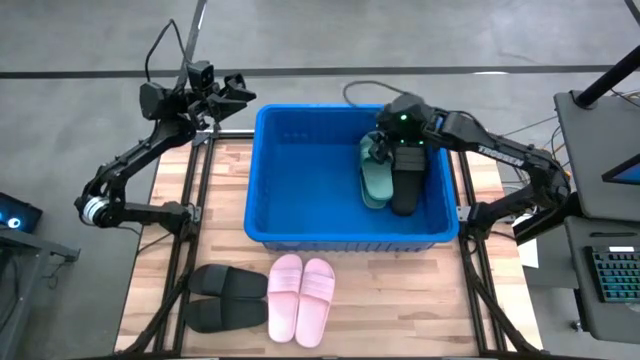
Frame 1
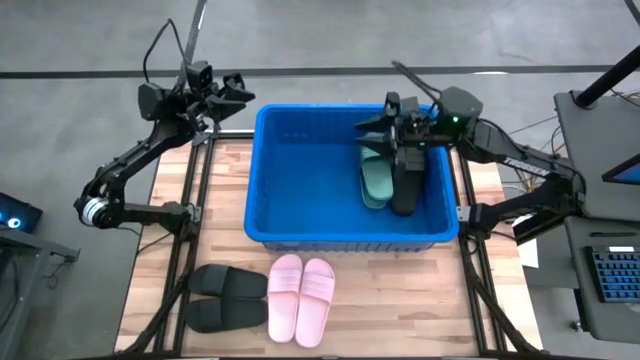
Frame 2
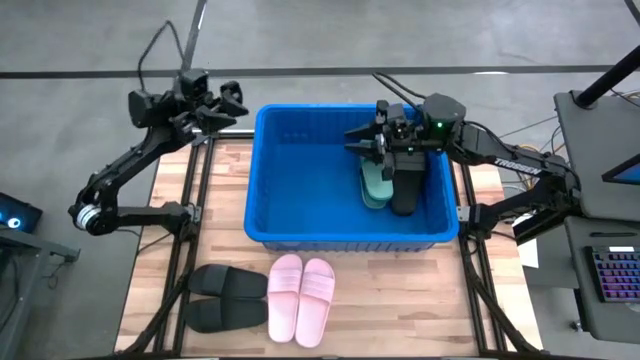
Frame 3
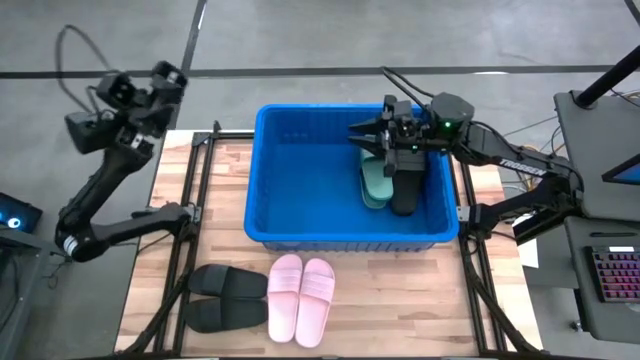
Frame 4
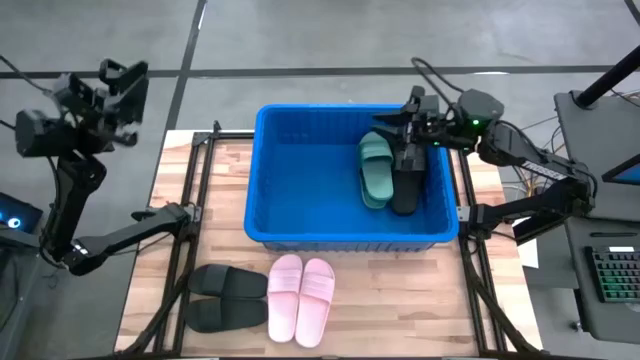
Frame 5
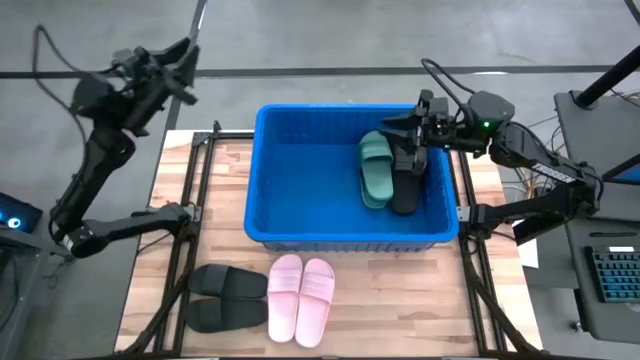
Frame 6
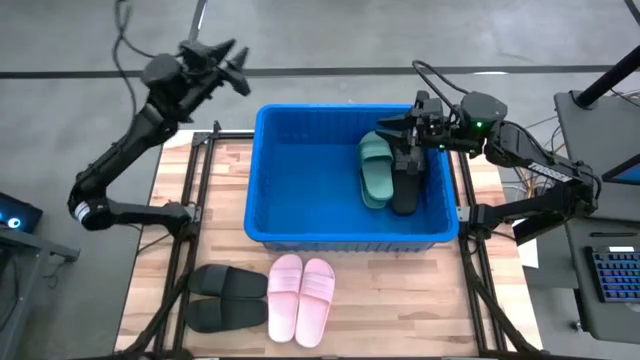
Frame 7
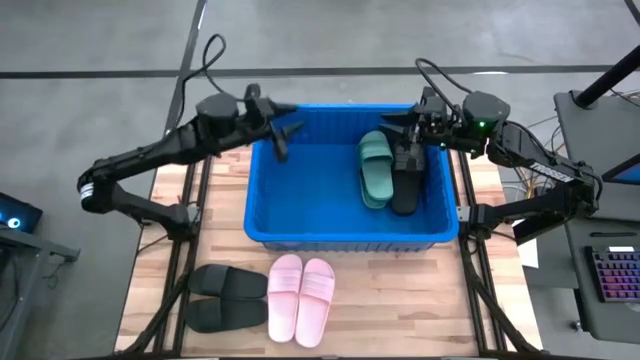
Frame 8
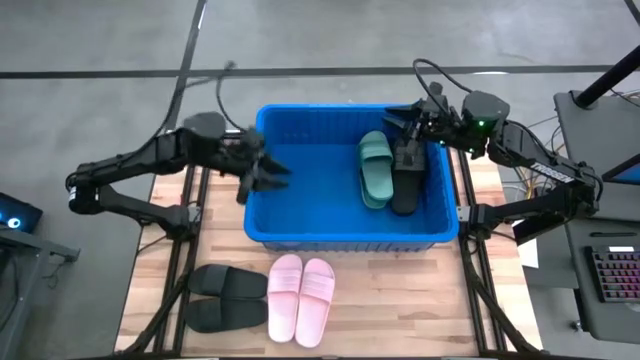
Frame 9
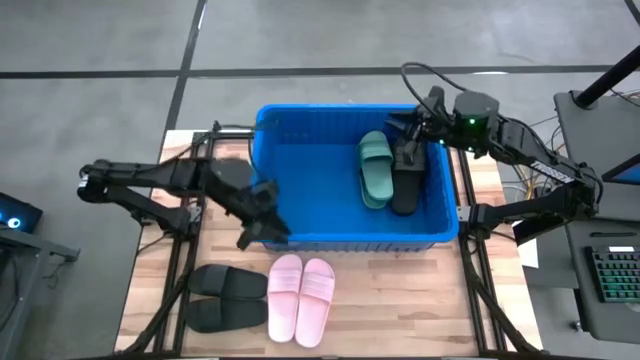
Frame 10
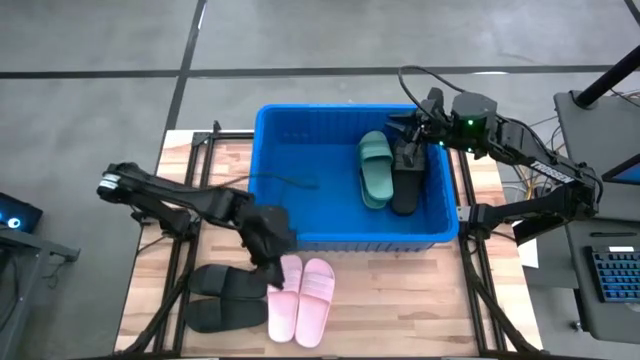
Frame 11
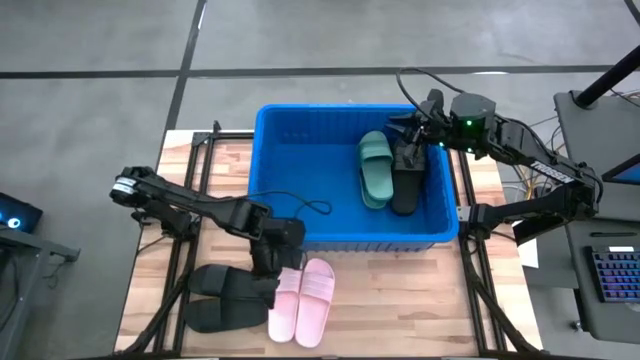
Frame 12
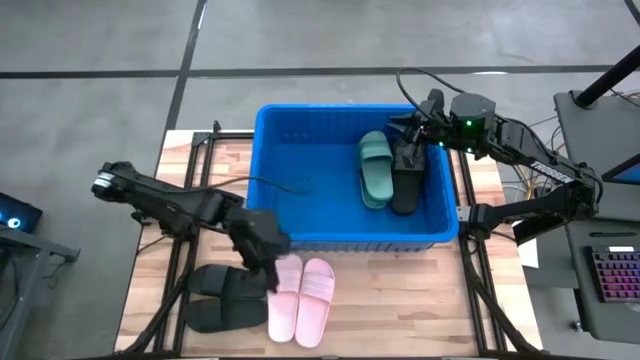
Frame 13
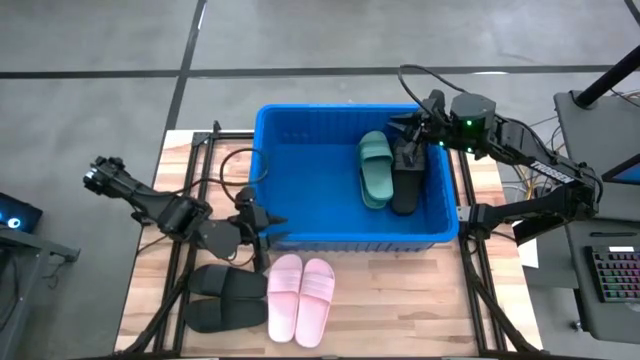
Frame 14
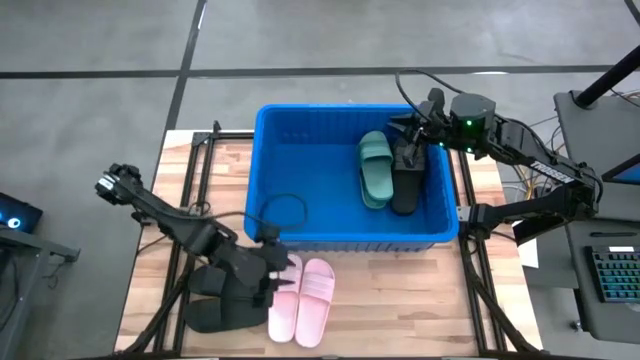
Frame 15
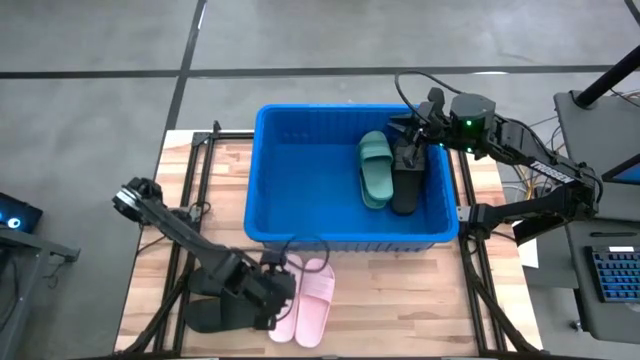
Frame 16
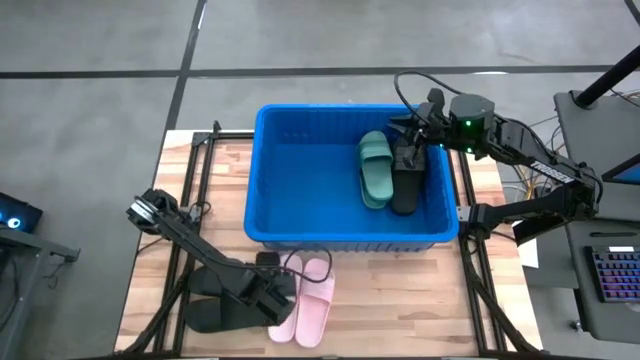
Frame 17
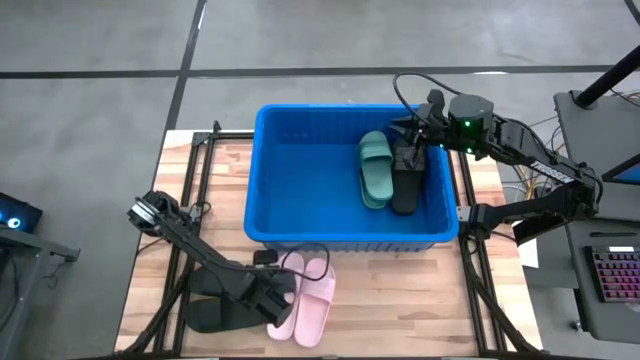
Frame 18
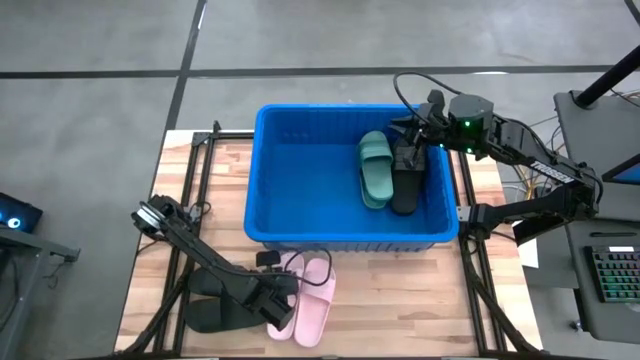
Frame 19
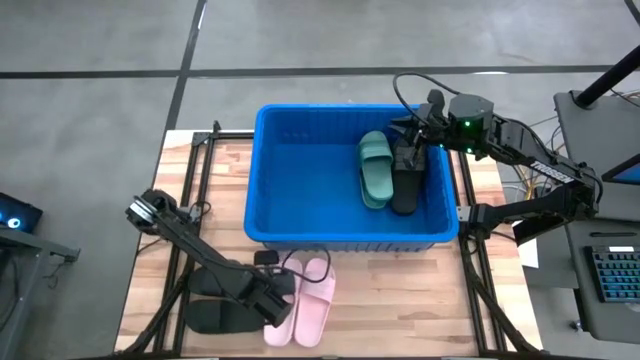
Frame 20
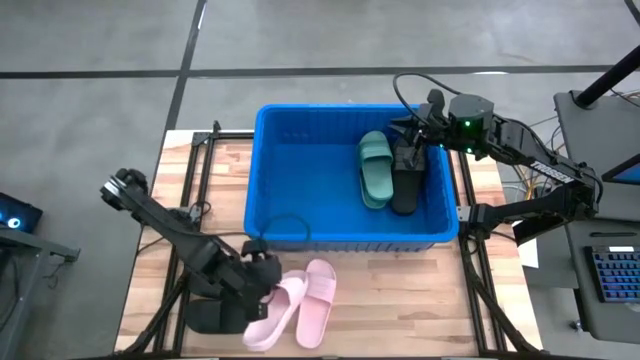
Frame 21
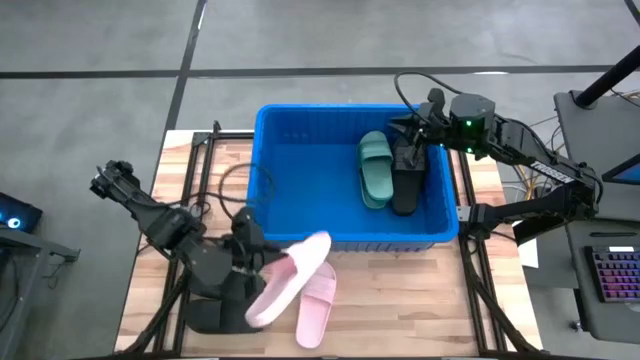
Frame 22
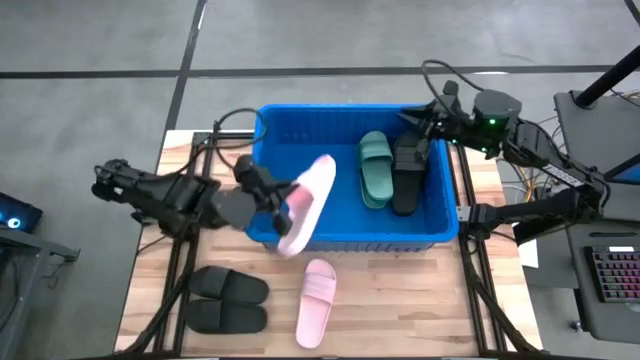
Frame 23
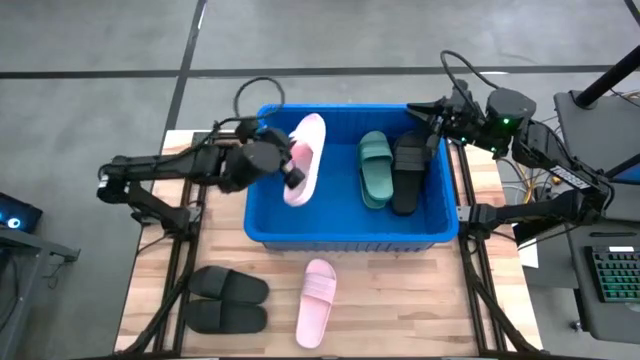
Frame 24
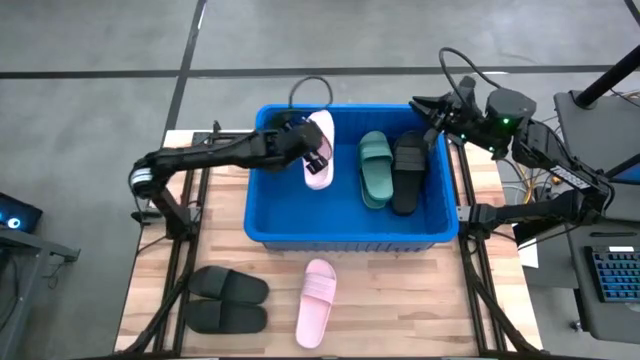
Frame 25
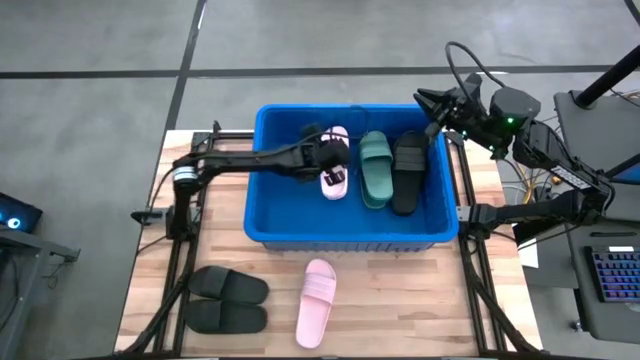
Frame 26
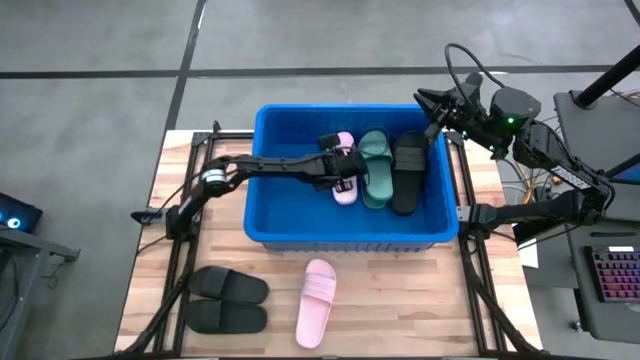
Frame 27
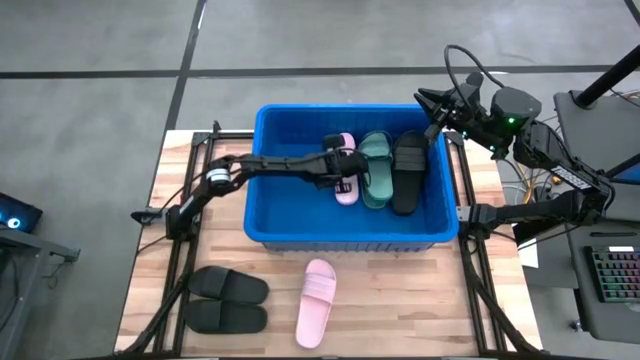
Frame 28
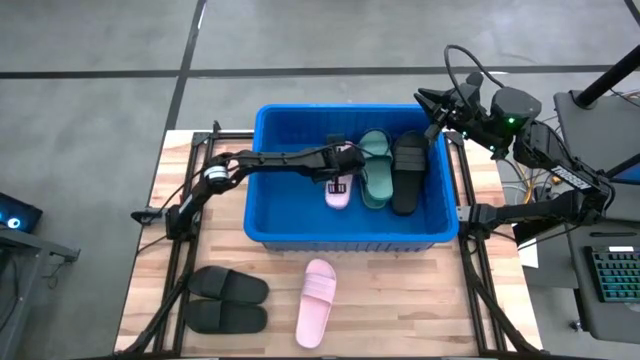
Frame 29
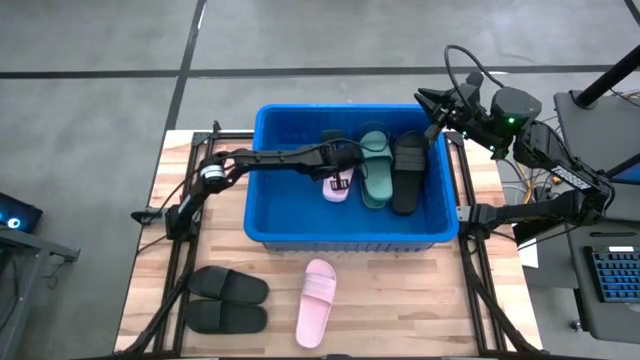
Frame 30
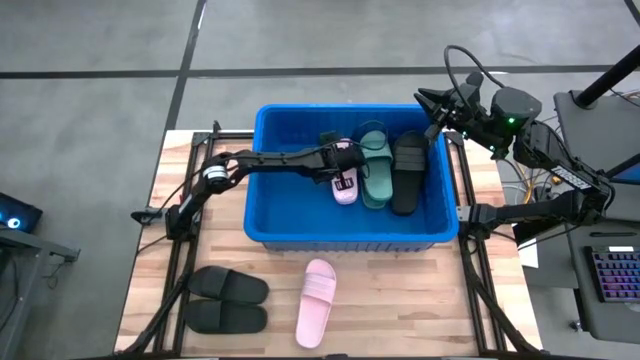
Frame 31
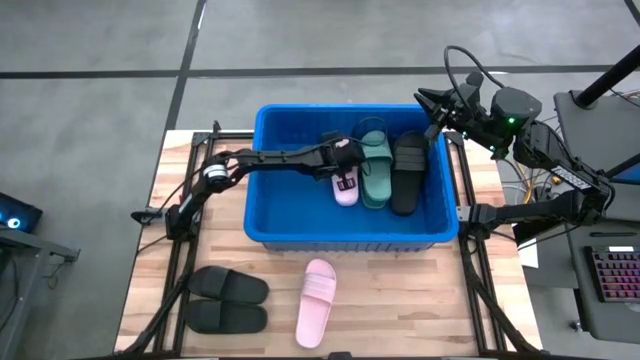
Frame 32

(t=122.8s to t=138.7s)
Task: Pick and place slides into bin
Put the pink slide into the blue bin

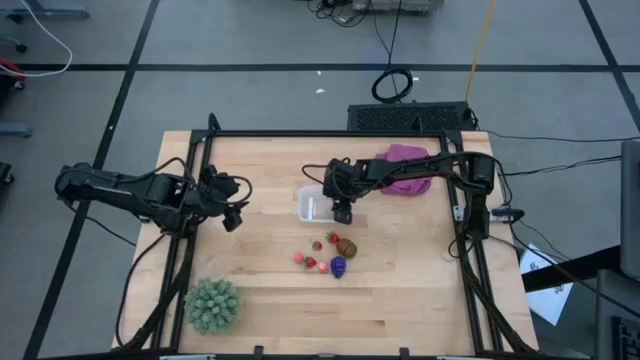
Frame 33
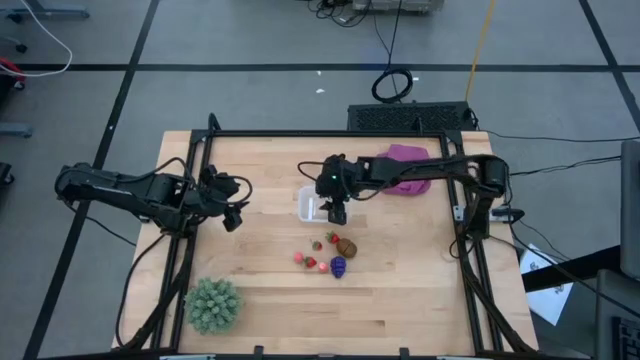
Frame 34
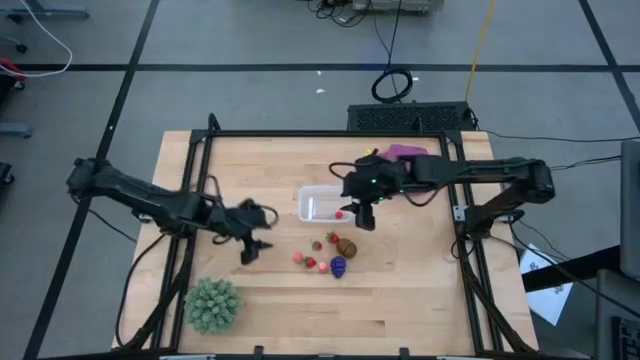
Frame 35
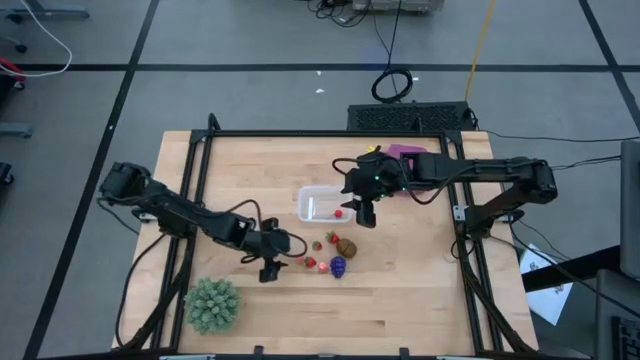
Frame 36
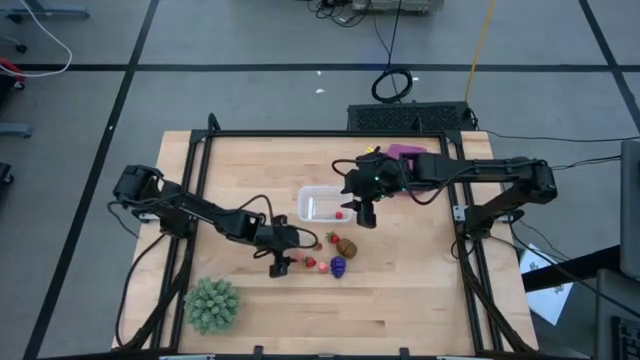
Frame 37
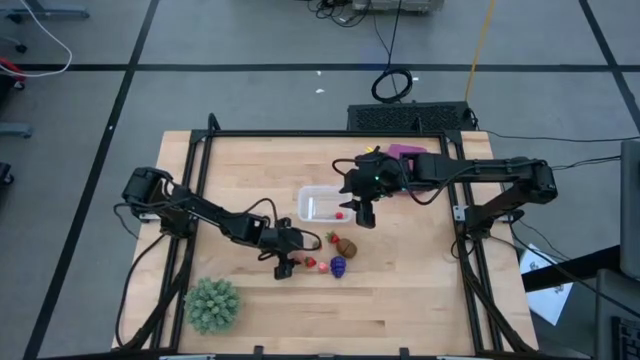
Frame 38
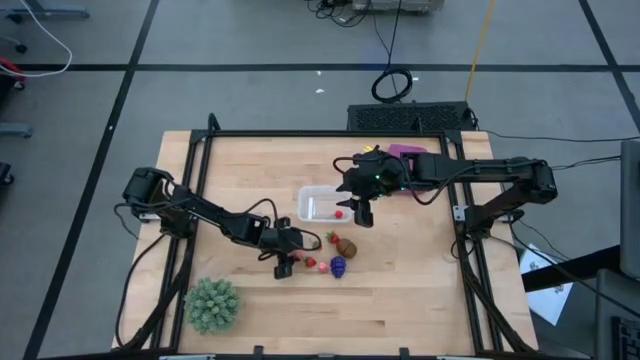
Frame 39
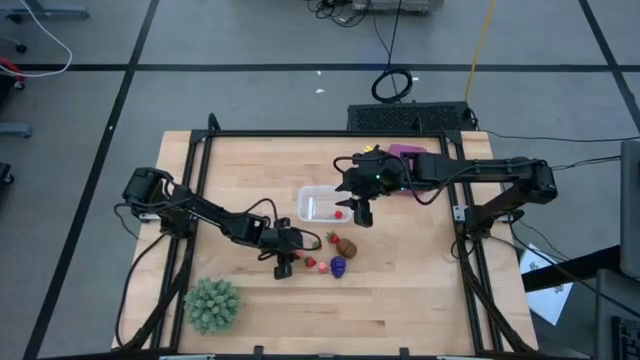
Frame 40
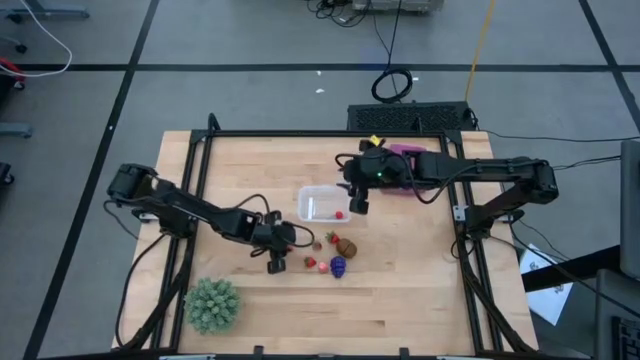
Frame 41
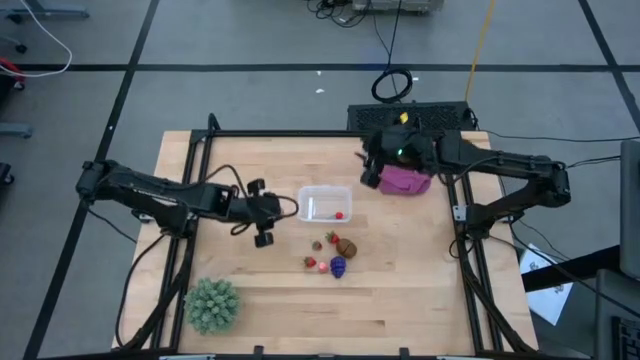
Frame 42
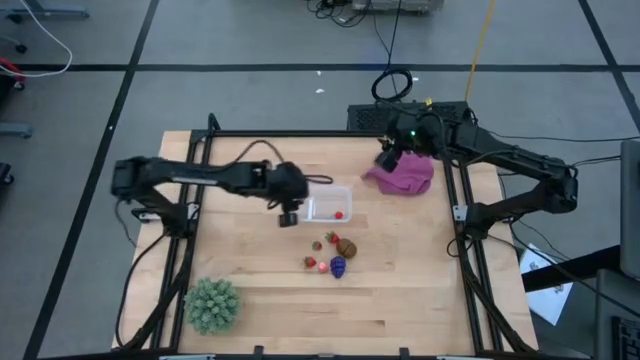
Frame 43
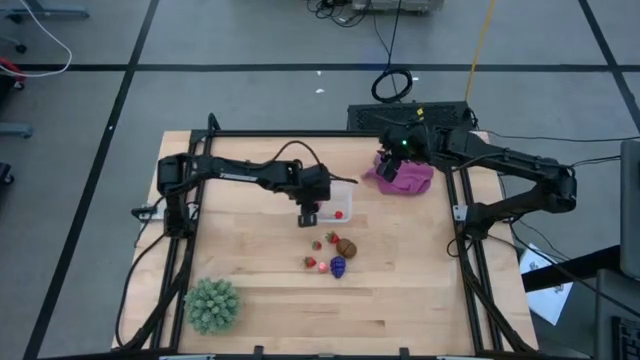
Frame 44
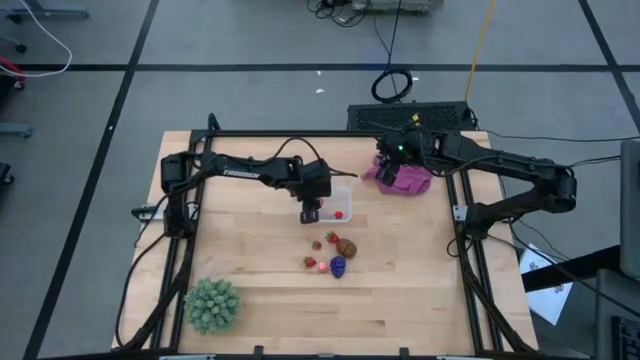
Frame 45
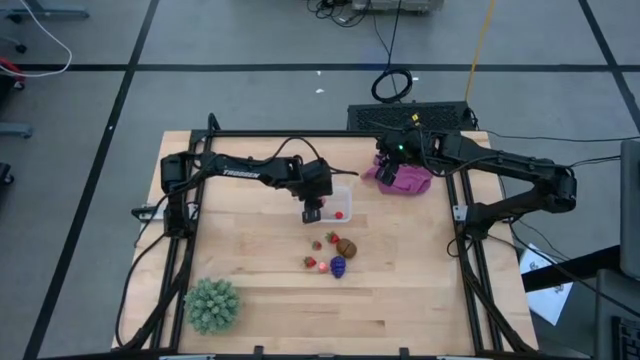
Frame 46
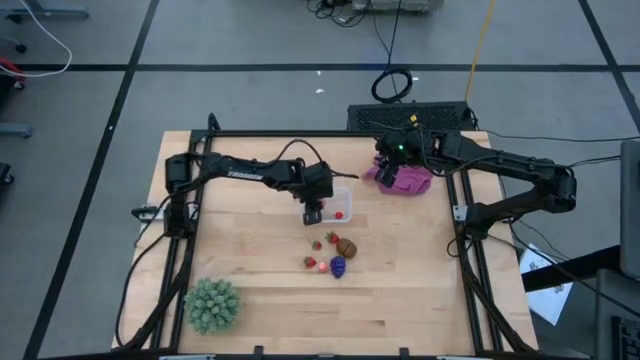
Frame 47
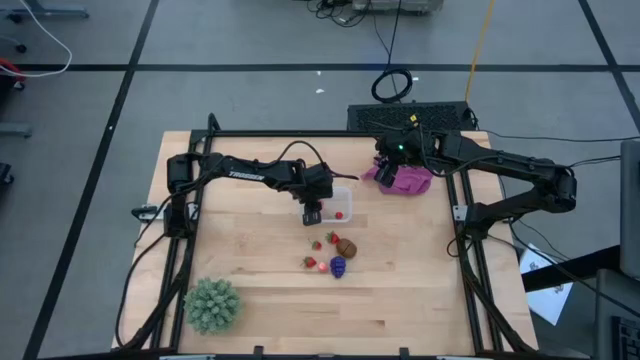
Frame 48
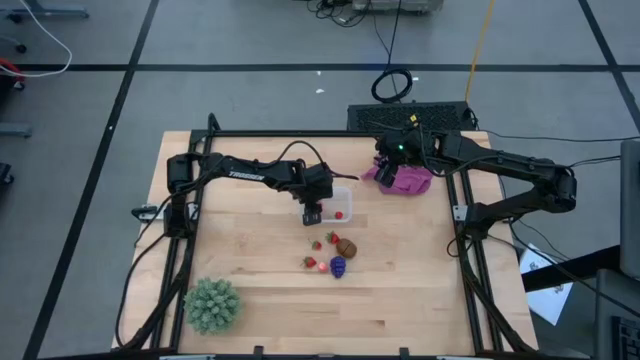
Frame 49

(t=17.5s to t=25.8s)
Task: Pick and placing Produce into tupperware
Put the left peach into the transparent bin
